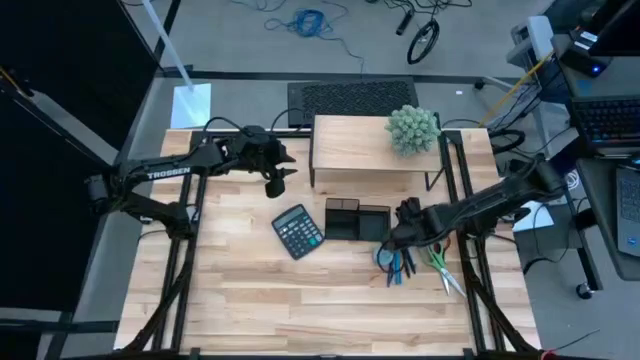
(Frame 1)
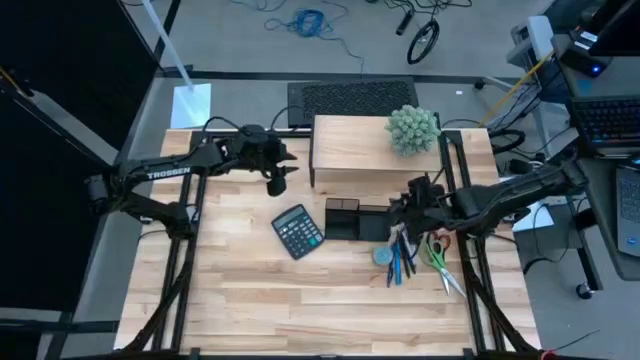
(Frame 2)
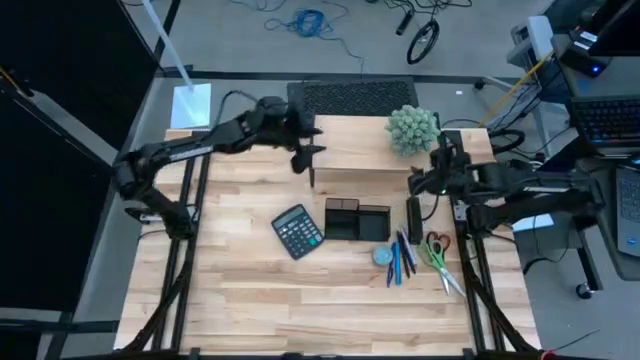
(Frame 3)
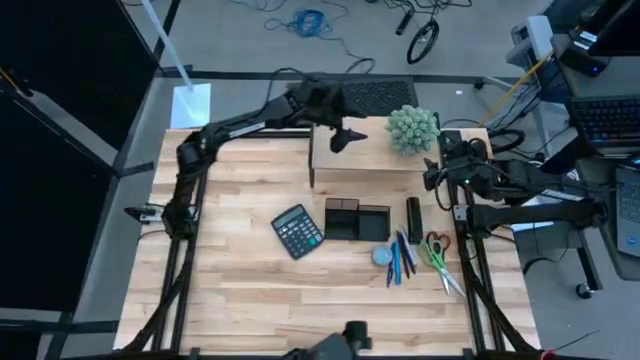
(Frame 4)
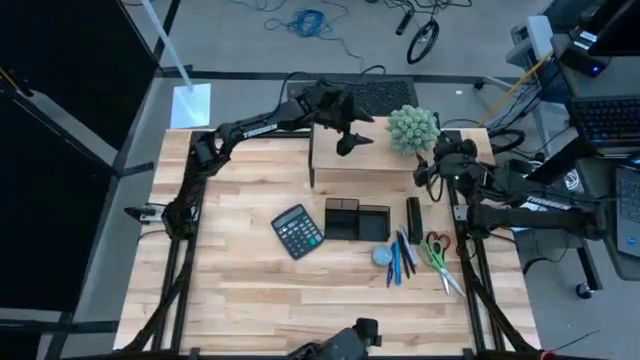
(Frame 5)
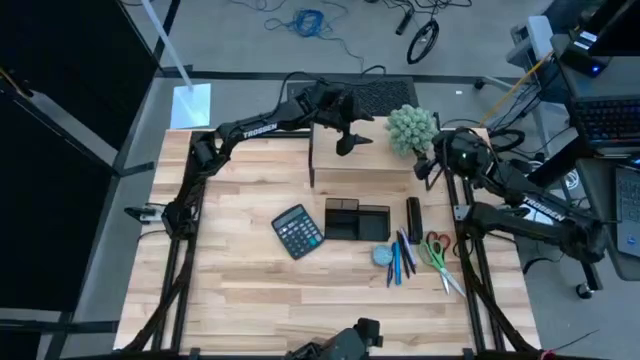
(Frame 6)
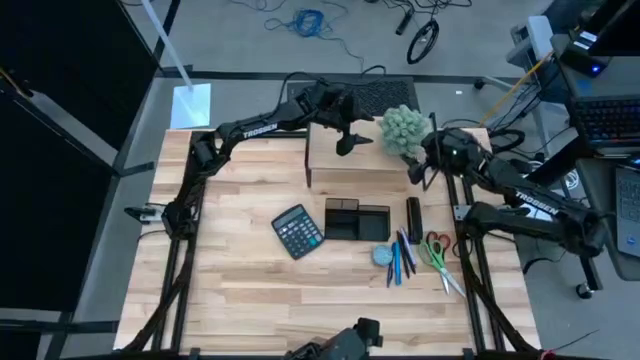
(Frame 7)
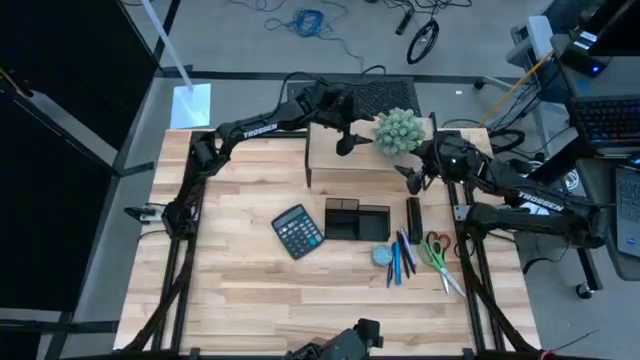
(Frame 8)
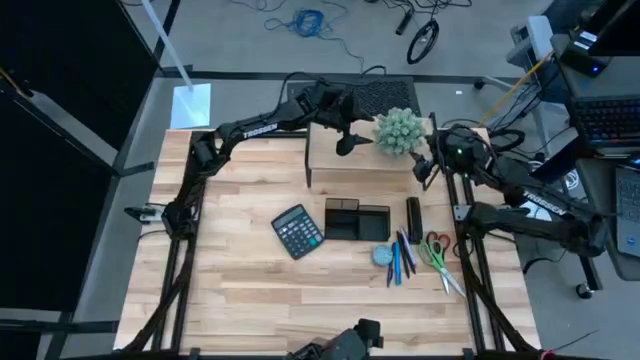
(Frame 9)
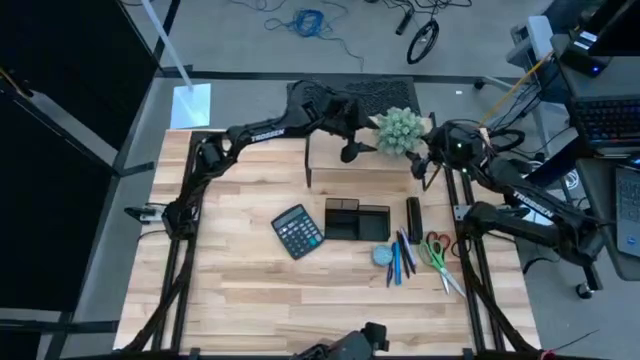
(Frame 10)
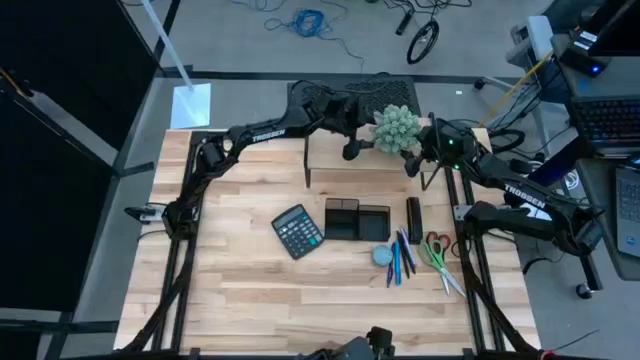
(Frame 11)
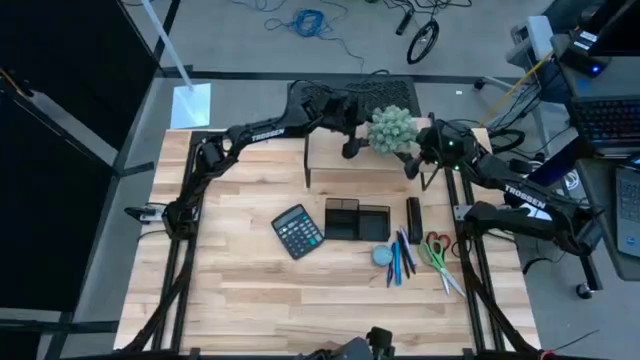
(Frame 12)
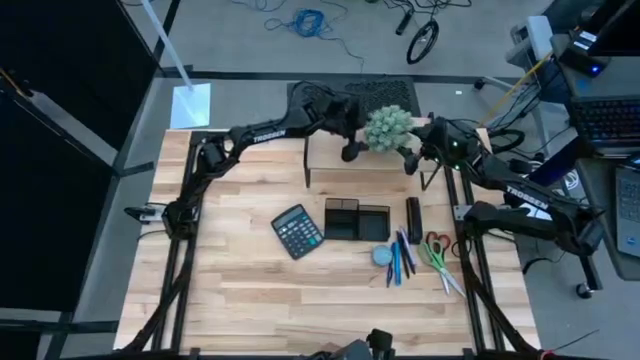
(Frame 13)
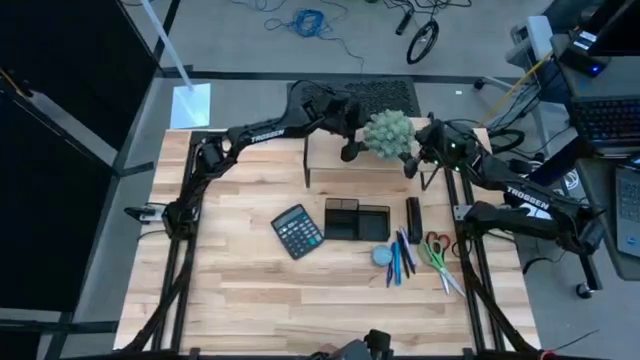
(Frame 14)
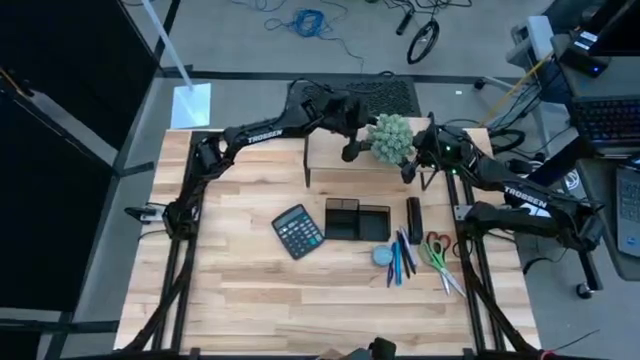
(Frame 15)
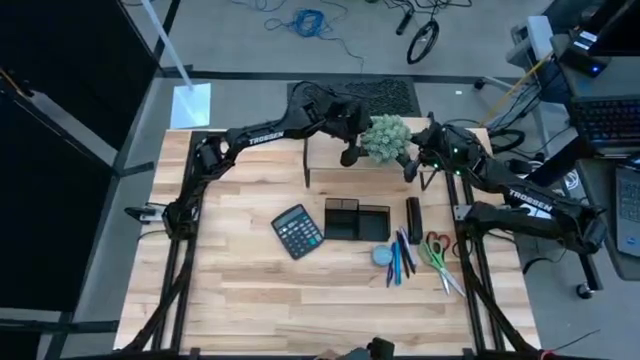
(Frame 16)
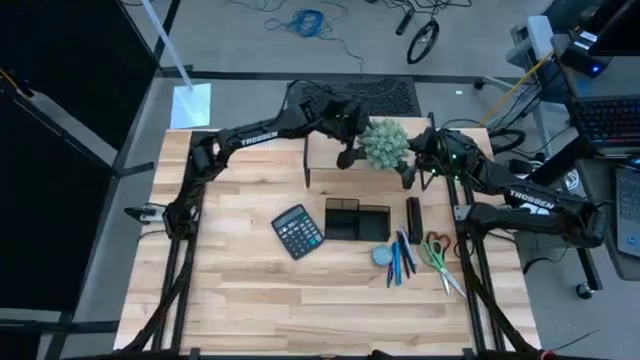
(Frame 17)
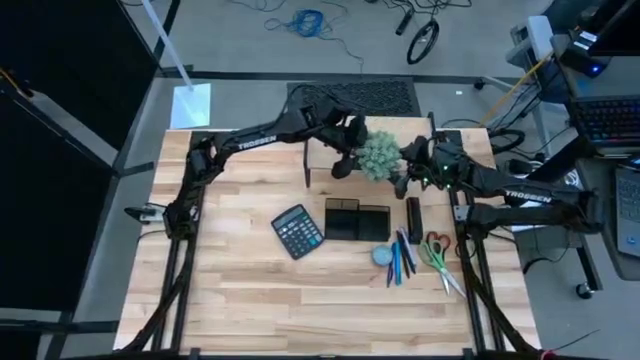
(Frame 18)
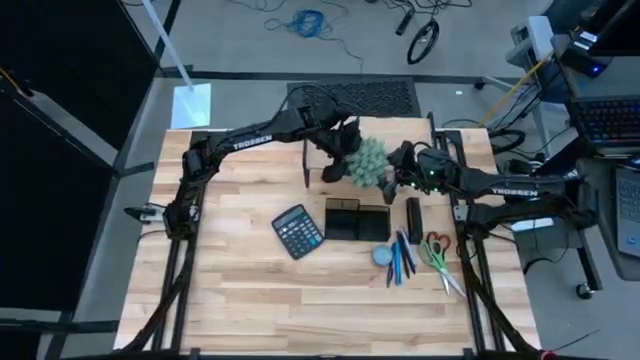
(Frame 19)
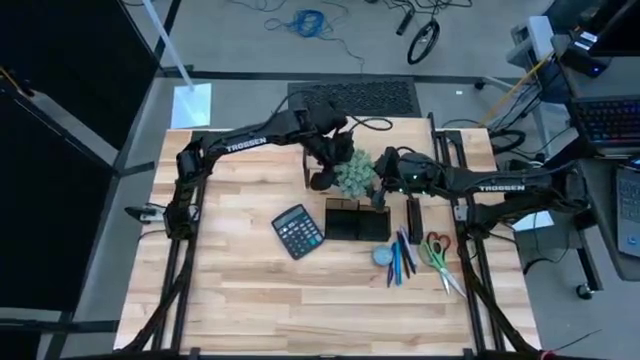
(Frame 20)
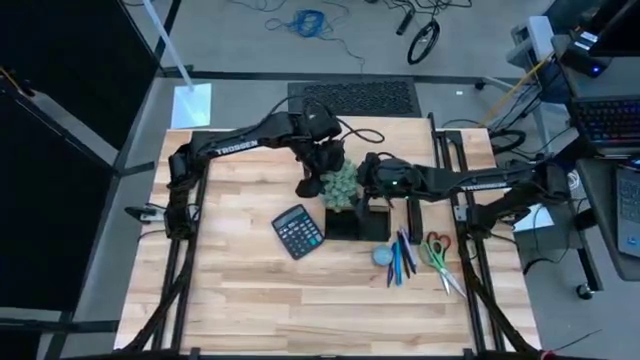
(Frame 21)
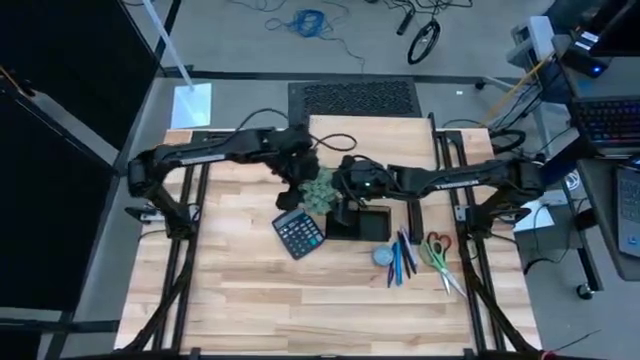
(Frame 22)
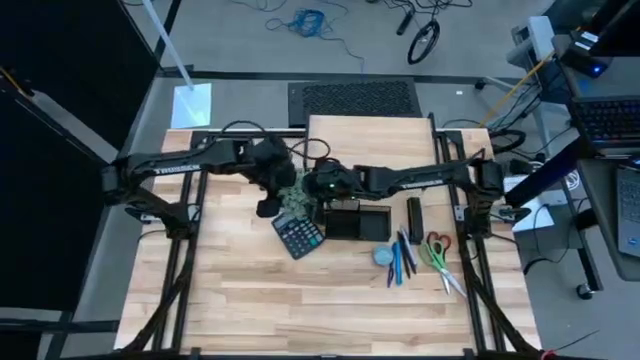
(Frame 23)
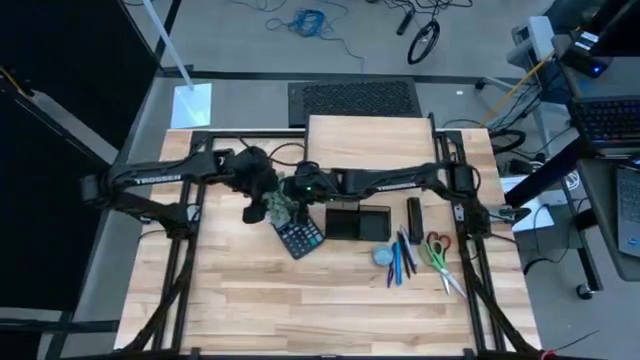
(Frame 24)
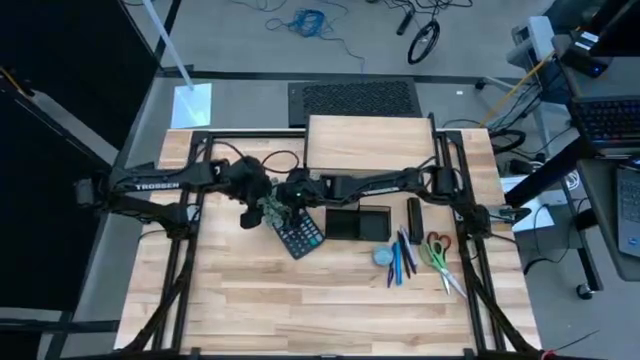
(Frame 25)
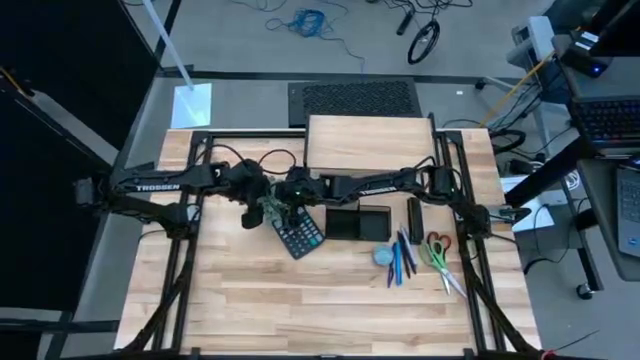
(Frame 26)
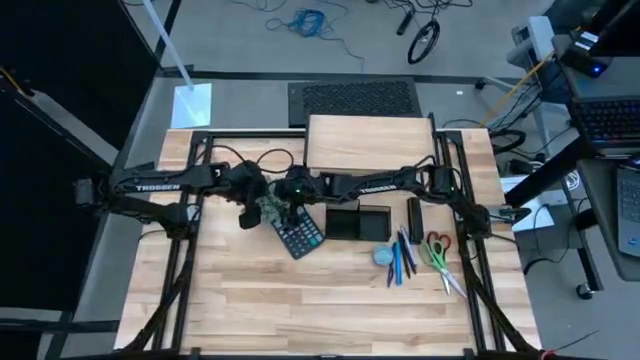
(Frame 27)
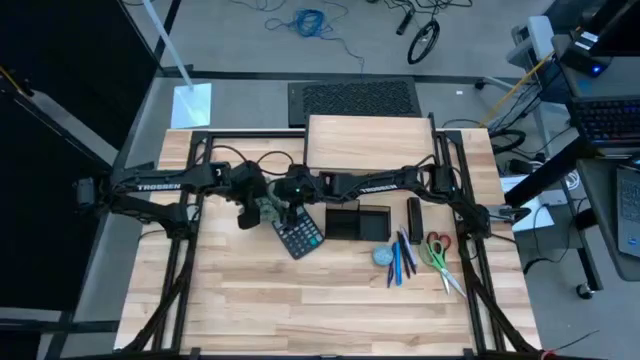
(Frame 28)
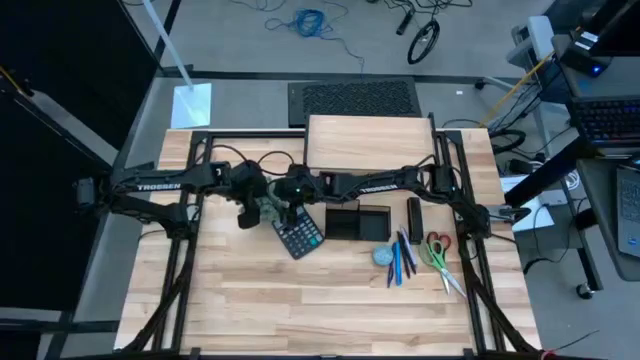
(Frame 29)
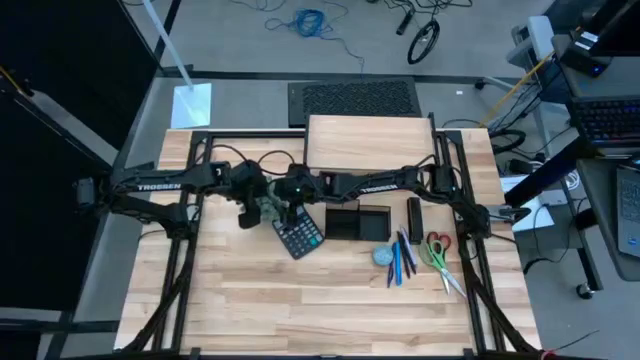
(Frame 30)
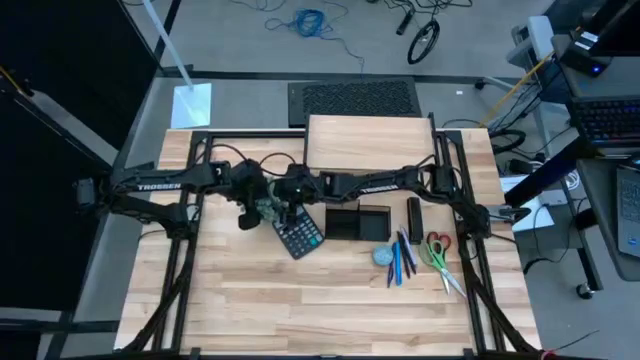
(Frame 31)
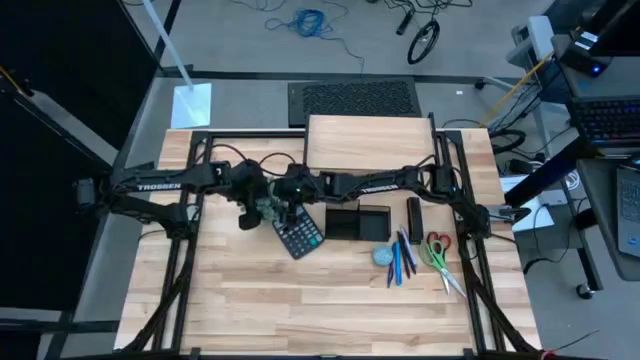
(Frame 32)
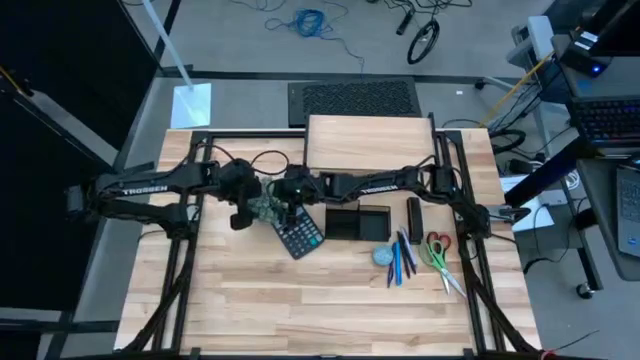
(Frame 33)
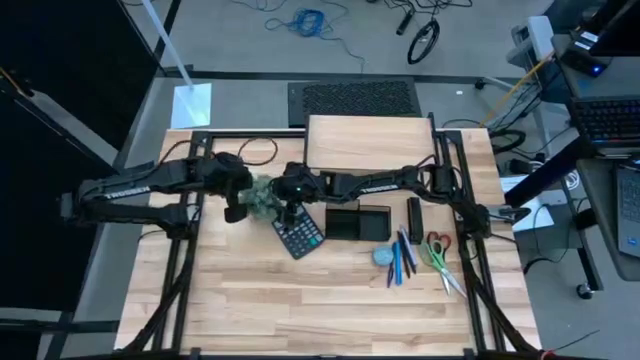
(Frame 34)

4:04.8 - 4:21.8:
Task: Pick and place office supplies into organizer
Remove the gray patterned vase plant from the wooden shelf

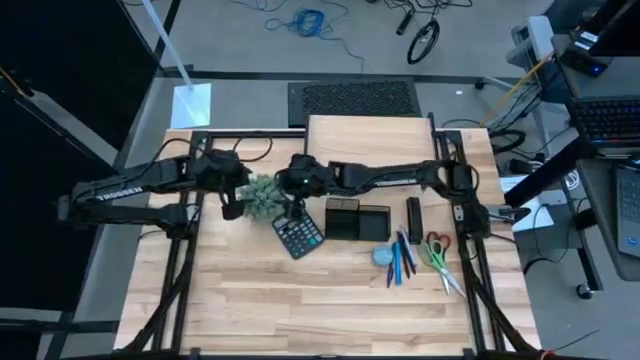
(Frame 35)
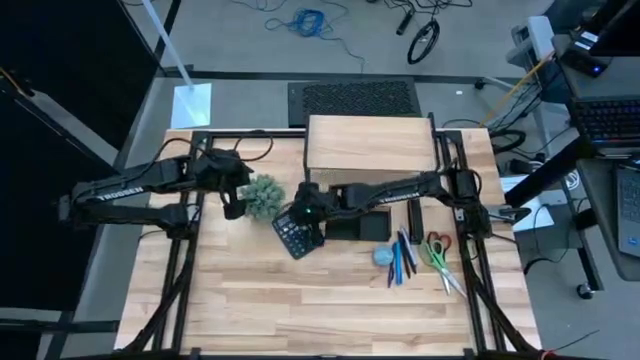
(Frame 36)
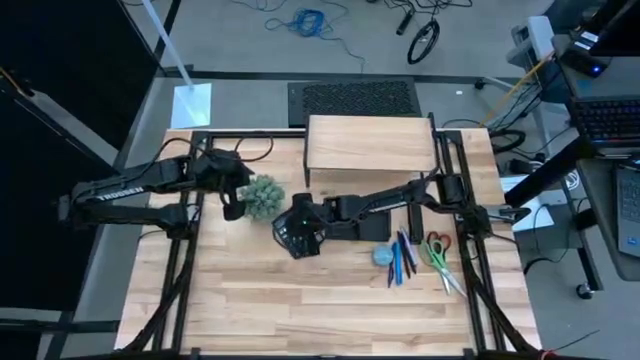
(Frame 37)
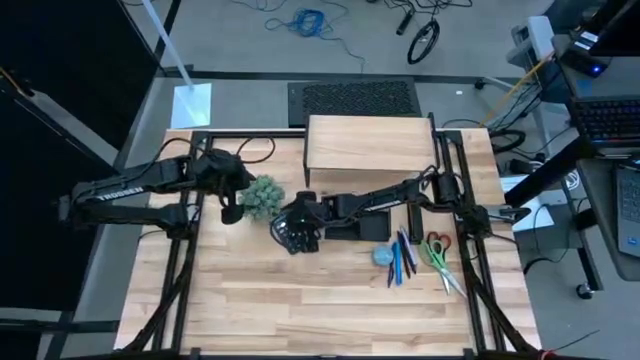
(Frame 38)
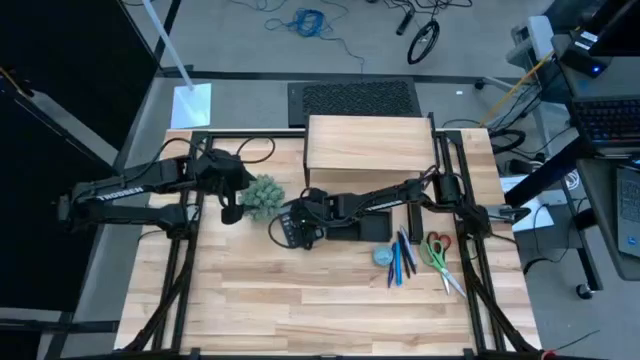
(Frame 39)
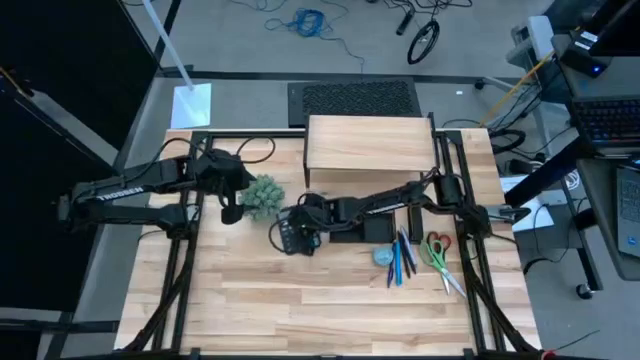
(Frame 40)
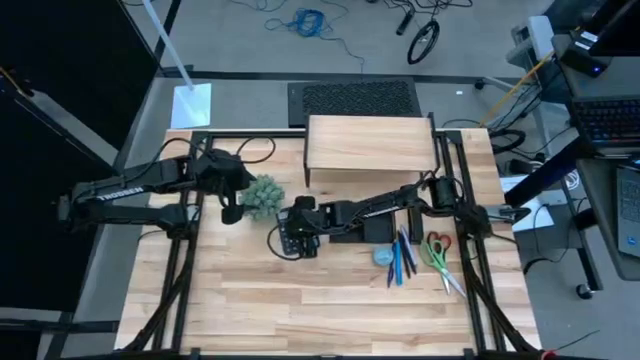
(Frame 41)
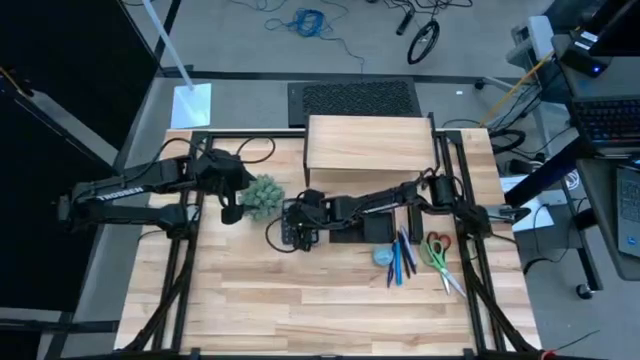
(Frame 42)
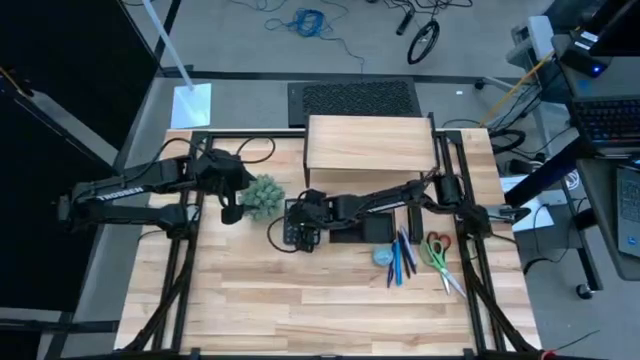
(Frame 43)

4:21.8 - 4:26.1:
Adjust the black calculator
